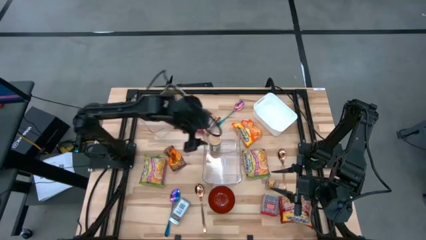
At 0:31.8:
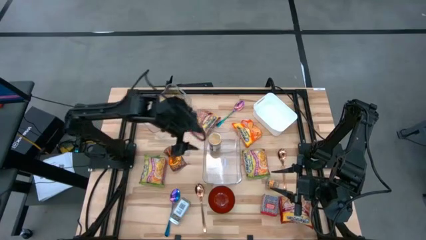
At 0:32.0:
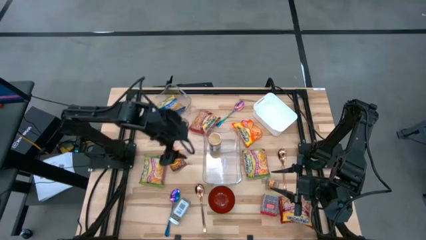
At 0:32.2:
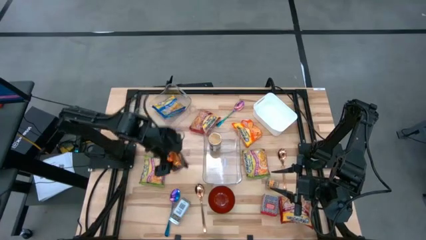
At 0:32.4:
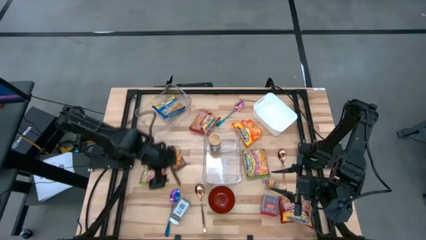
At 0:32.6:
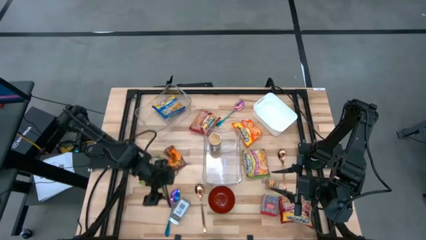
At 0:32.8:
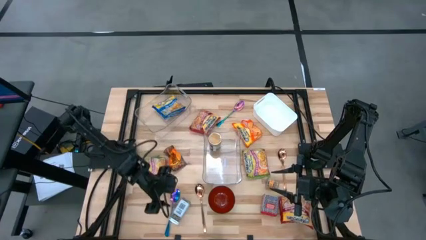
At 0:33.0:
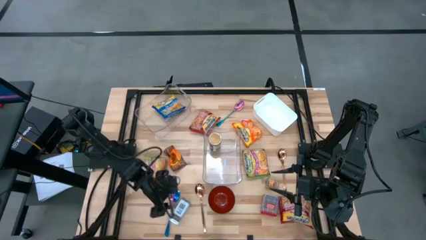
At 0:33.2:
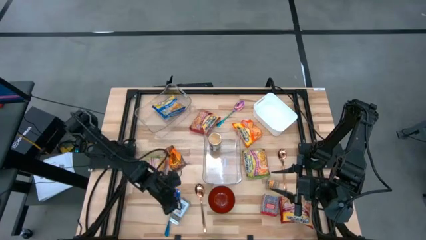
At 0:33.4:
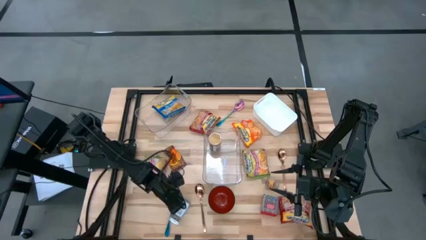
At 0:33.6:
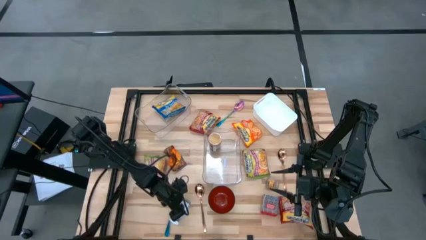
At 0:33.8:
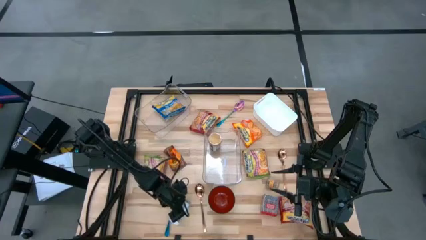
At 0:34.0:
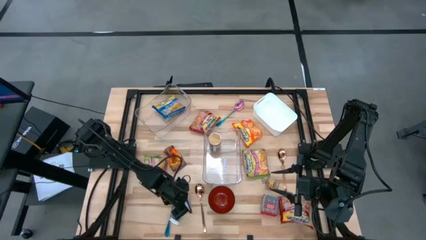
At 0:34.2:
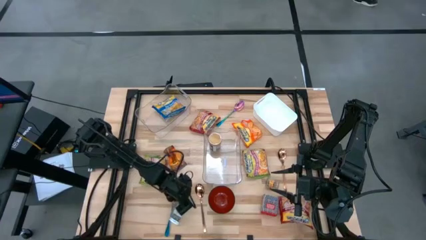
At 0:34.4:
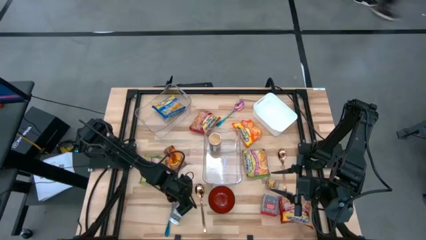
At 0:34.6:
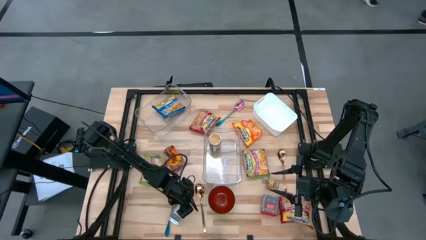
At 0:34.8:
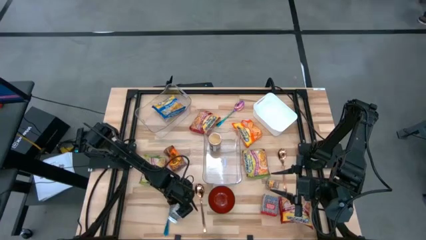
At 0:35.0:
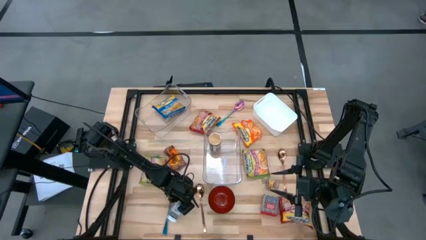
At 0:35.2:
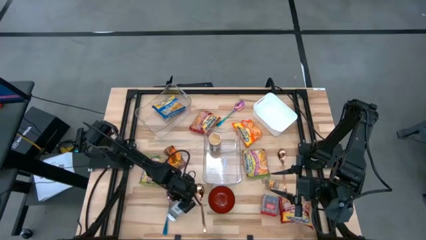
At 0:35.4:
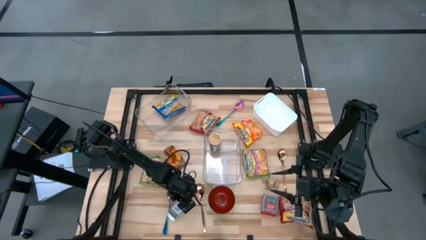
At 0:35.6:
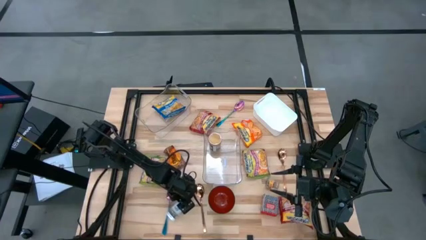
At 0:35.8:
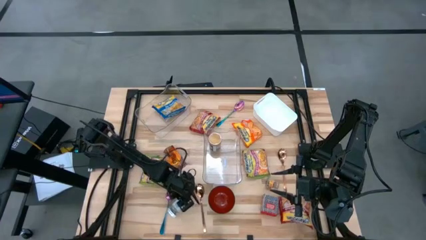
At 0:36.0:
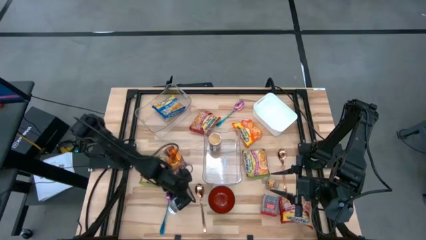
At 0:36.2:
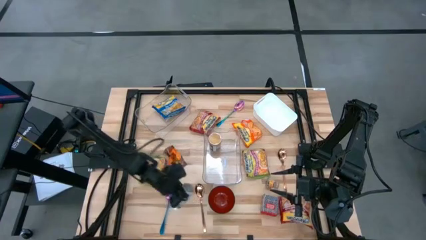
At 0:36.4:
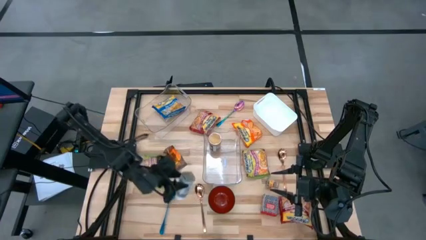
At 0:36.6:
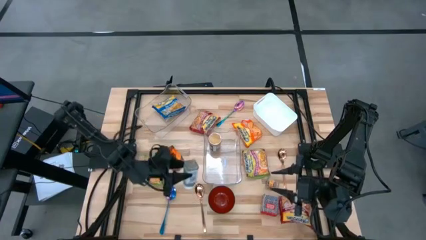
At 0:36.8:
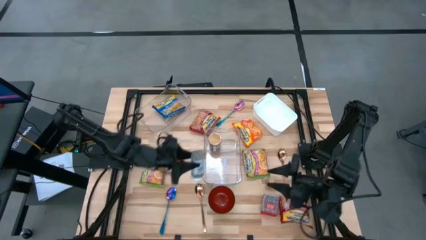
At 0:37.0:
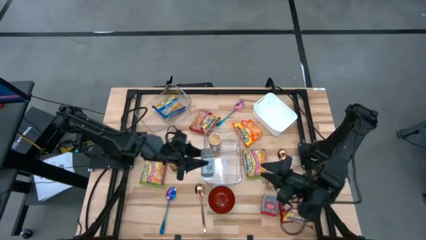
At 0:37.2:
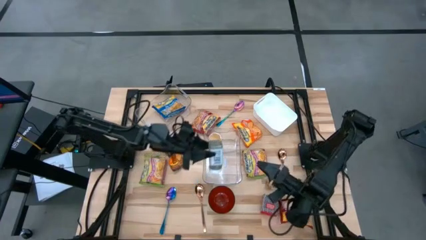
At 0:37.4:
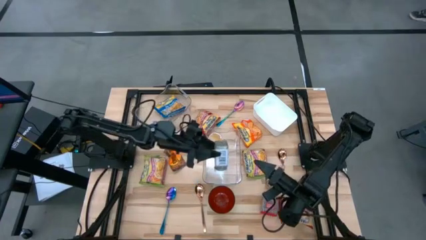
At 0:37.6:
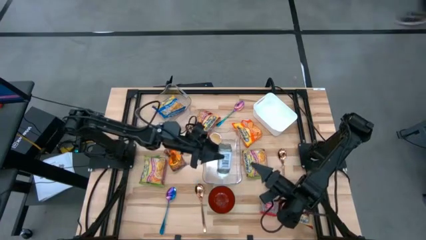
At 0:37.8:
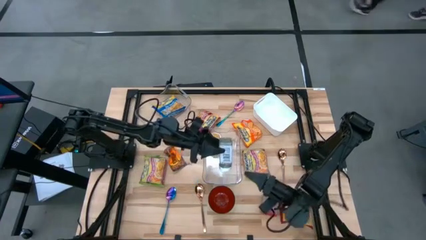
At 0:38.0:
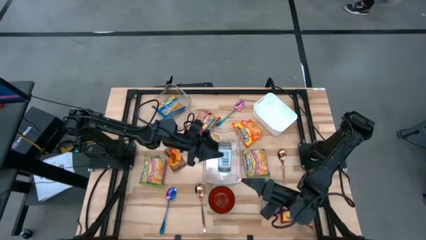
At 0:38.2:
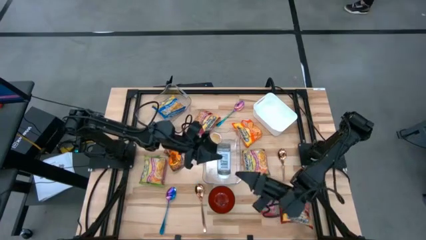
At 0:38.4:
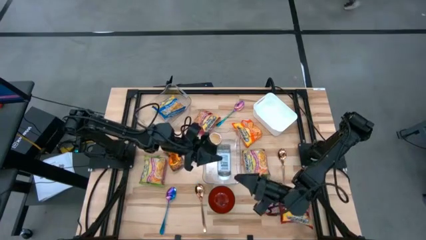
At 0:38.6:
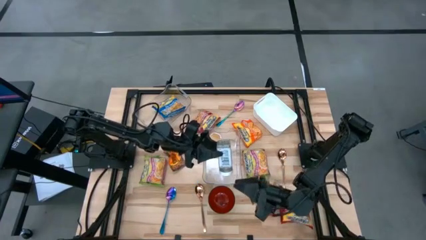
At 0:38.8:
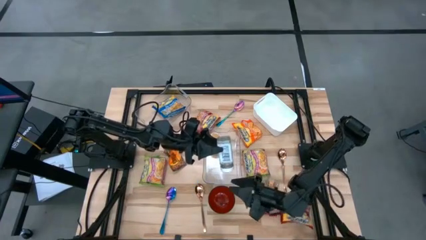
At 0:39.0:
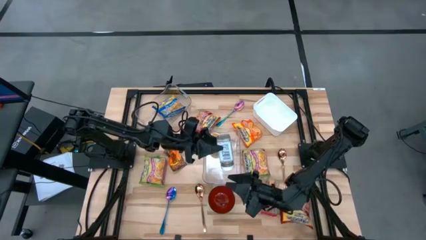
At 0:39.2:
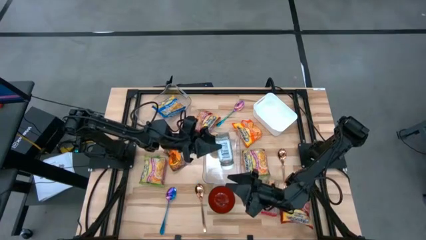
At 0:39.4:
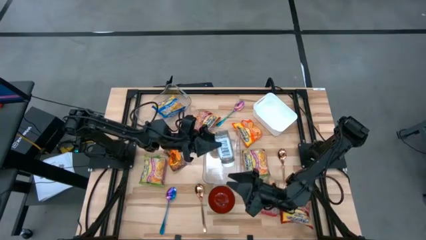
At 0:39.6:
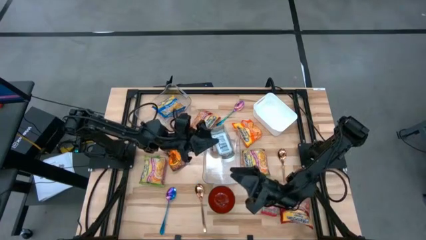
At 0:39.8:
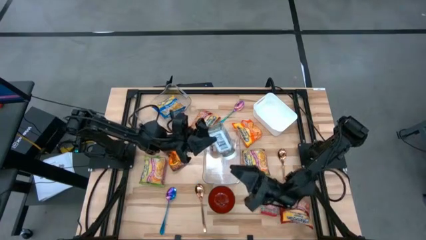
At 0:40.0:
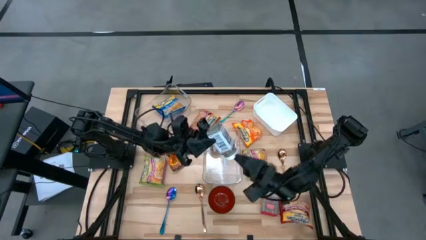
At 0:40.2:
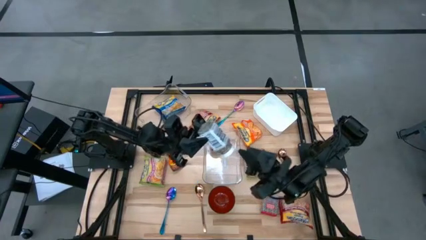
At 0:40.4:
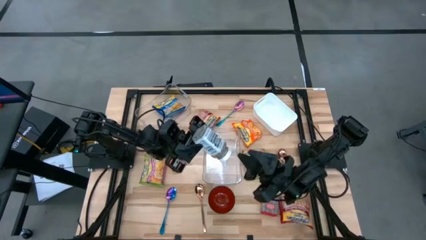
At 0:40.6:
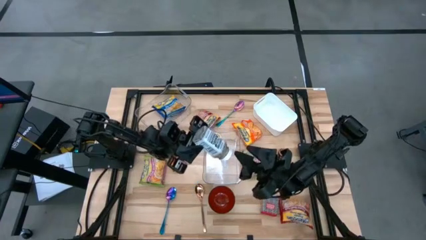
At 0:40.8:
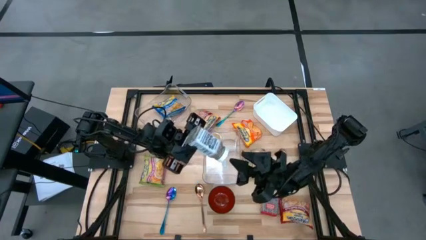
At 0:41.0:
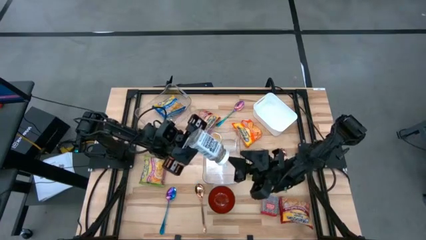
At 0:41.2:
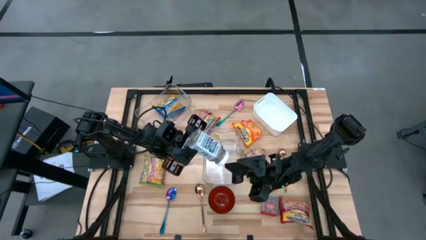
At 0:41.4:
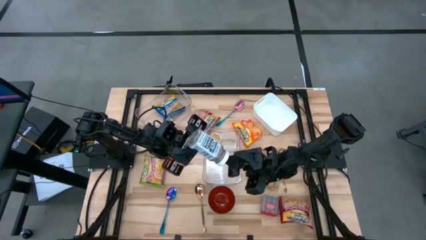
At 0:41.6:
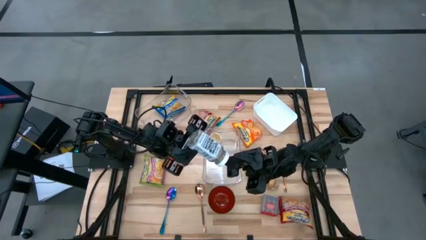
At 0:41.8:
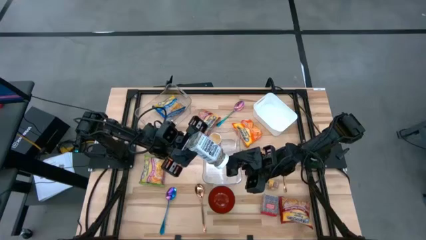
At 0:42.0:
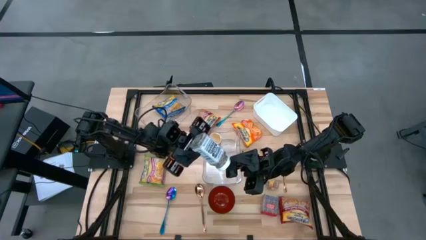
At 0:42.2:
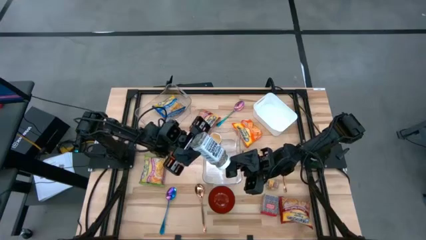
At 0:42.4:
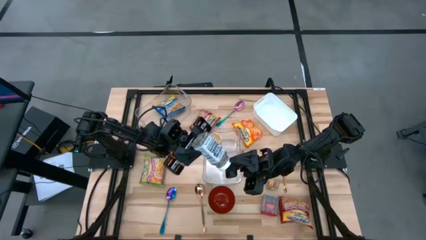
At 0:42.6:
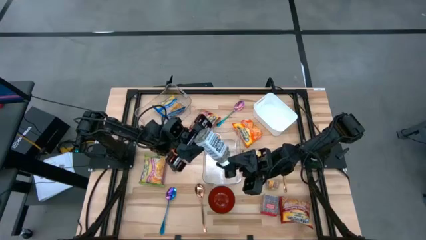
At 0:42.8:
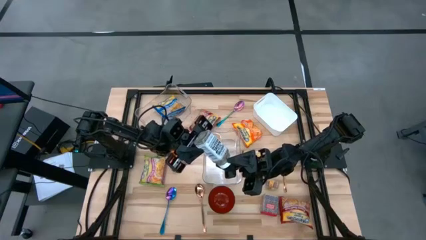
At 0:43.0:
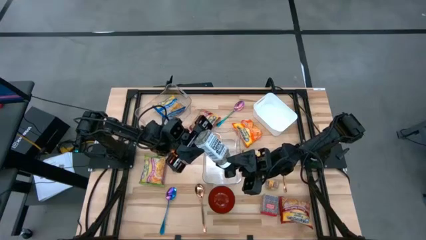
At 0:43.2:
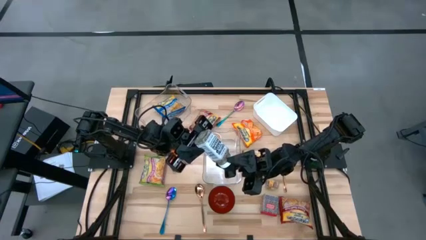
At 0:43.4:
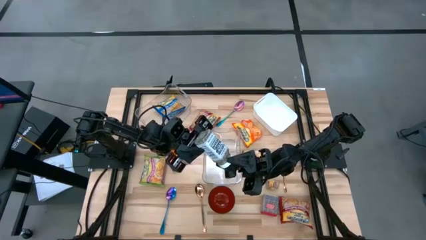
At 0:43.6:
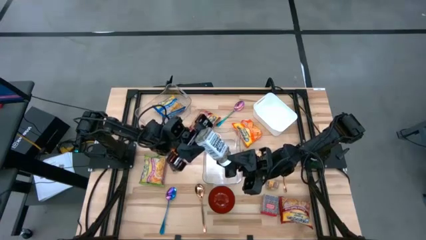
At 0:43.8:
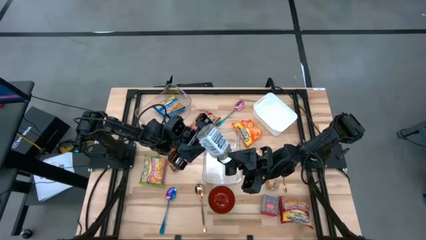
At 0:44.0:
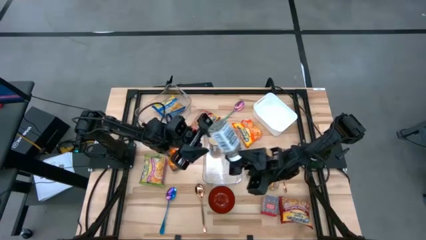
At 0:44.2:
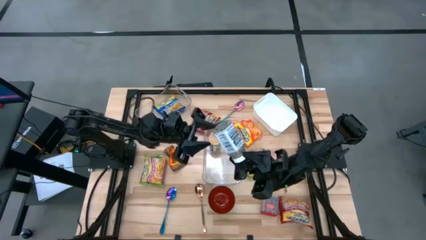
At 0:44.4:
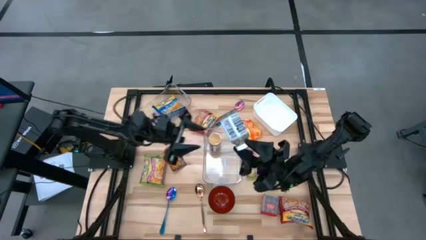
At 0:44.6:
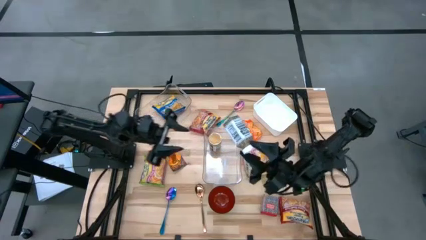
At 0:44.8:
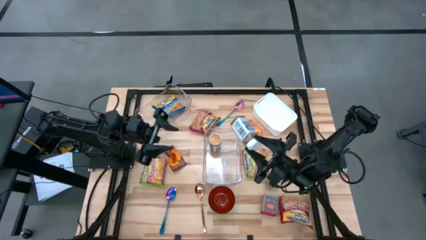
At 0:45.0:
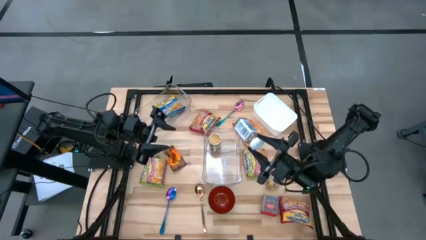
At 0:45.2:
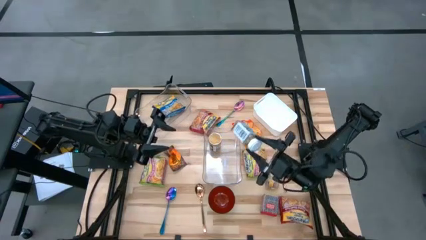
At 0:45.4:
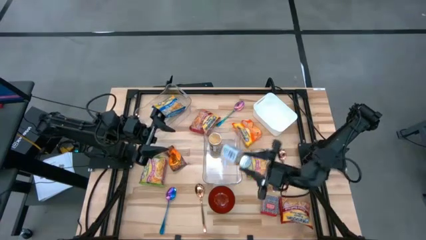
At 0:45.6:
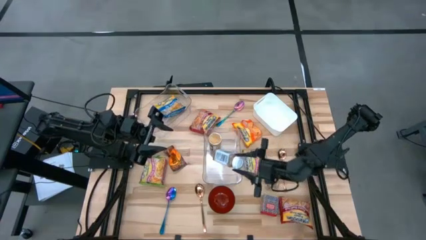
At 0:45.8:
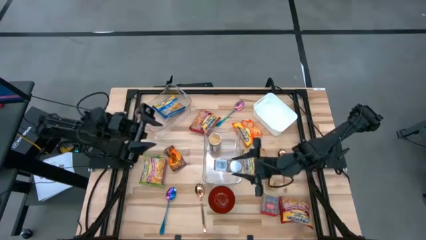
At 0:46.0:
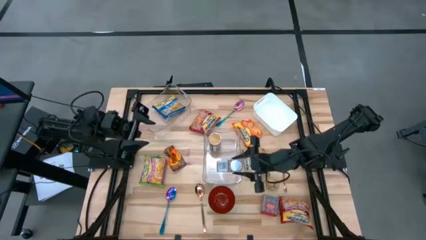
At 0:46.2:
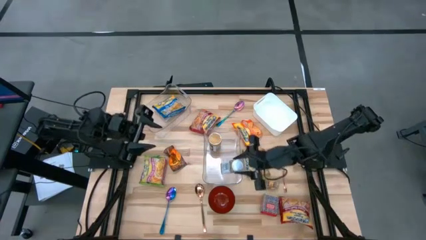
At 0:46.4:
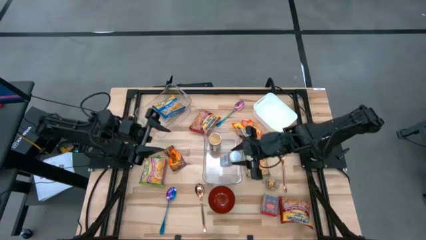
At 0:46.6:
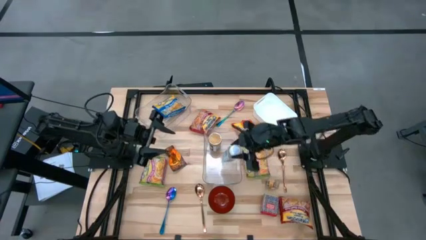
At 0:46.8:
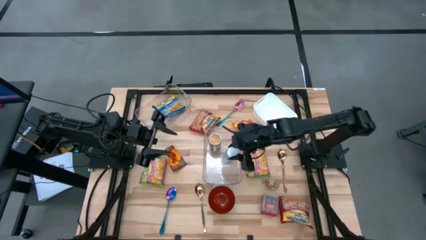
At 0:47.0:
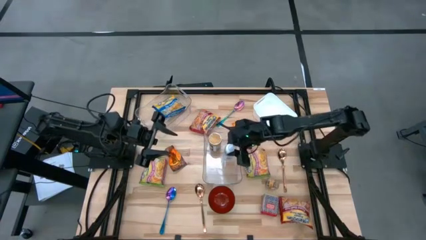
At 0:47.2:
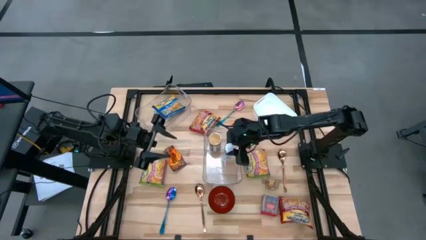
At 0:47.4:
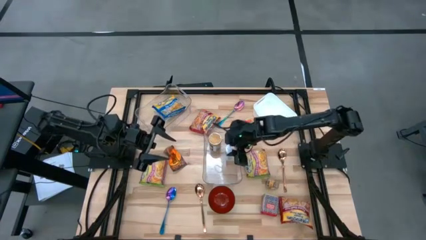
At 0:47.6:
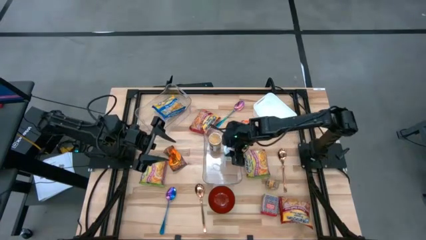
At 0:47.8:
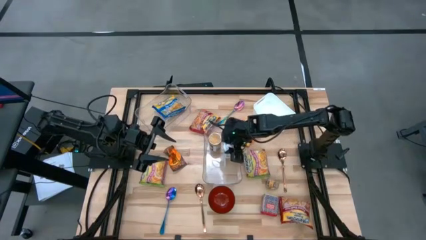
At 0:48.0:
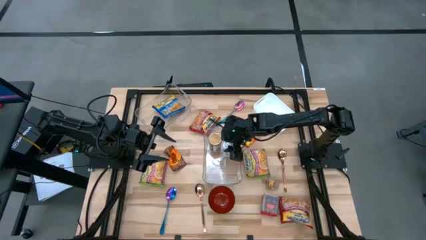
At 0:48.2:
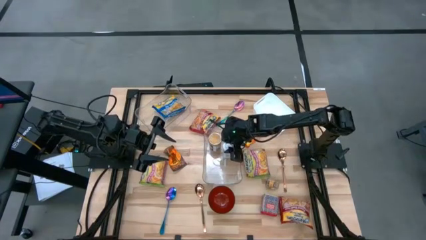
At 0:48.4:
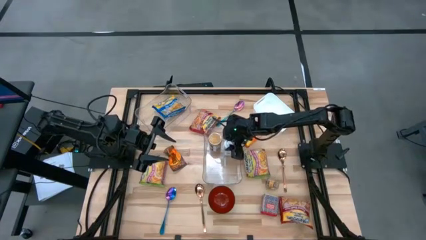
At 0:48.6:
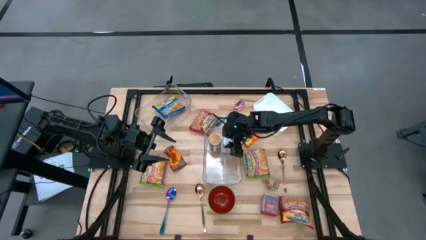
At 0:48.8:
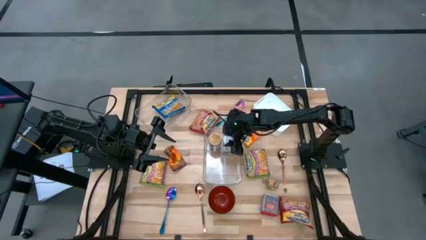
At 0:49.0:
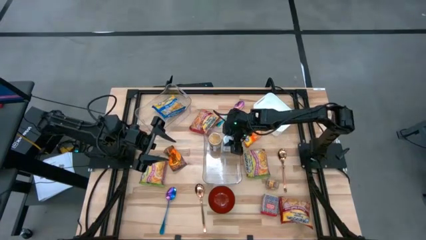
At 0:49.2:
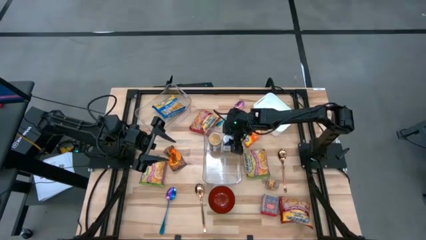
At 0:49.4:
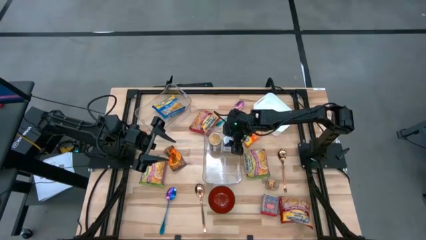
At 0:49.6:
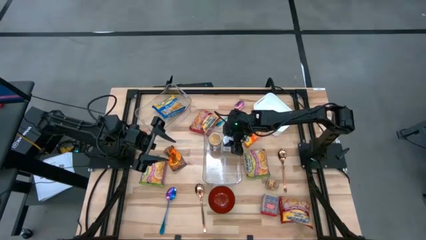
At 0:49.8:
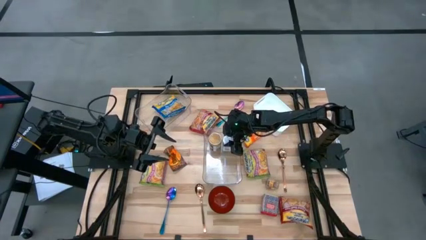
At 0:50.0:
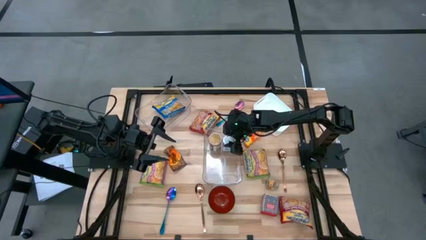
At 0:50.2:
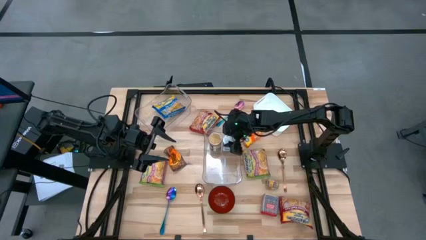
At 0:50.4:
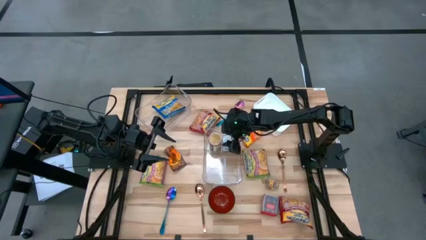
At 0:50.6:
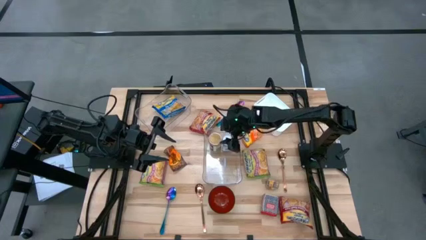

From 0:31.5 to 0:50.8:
Task: Pick & Place Food Item
Put the white spice bottle into the bottom transparent bin
